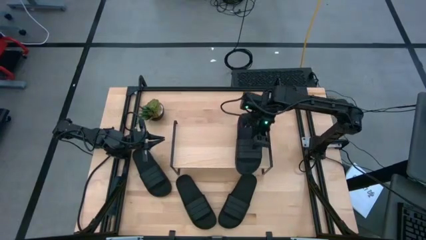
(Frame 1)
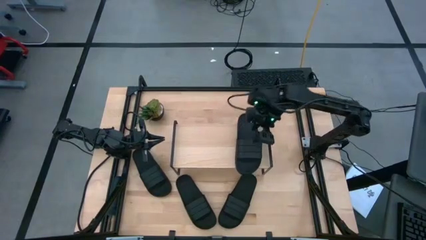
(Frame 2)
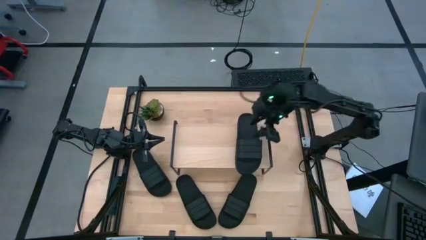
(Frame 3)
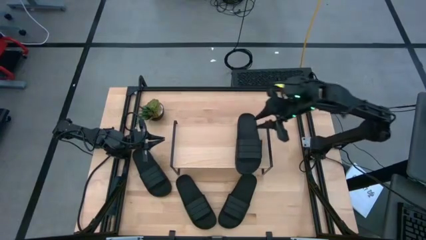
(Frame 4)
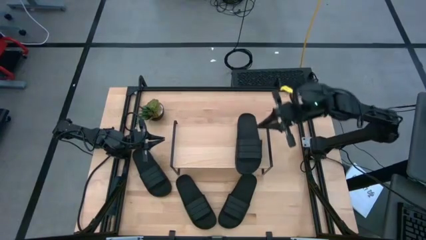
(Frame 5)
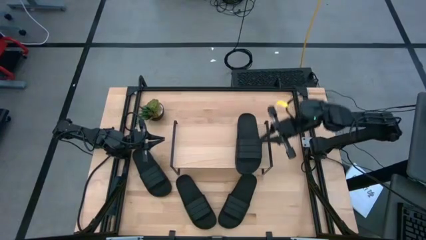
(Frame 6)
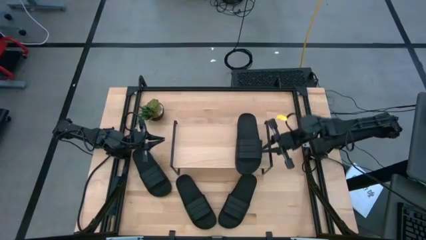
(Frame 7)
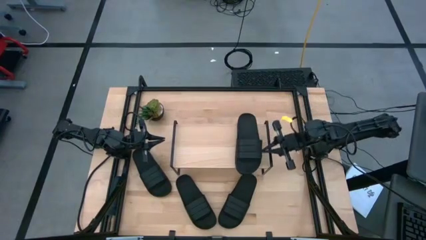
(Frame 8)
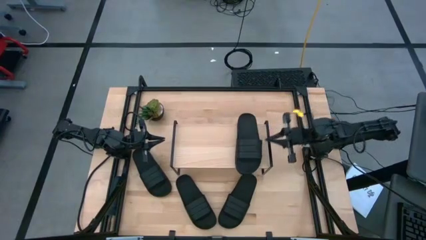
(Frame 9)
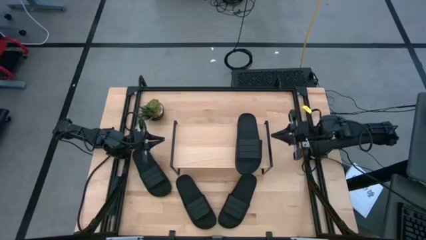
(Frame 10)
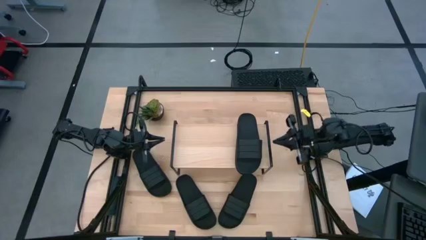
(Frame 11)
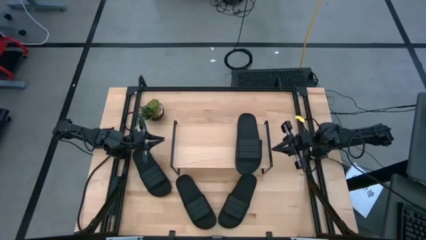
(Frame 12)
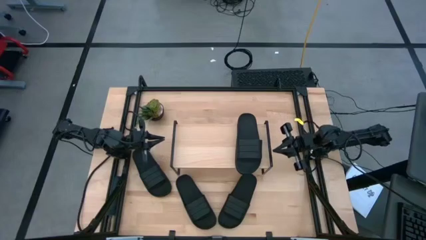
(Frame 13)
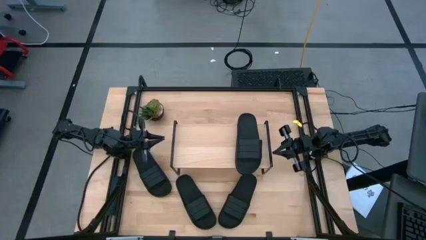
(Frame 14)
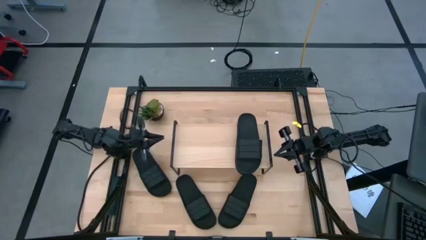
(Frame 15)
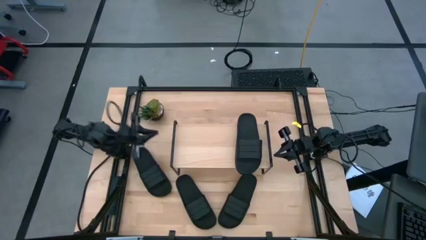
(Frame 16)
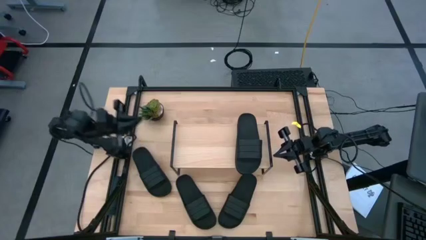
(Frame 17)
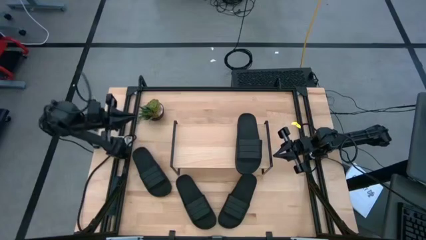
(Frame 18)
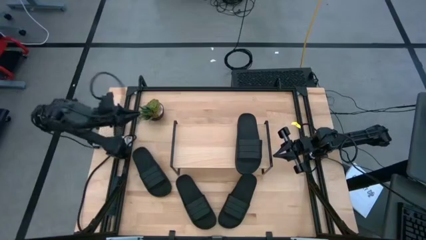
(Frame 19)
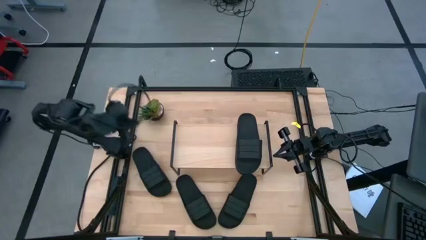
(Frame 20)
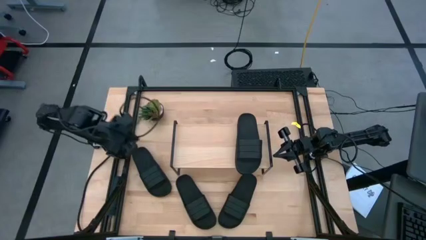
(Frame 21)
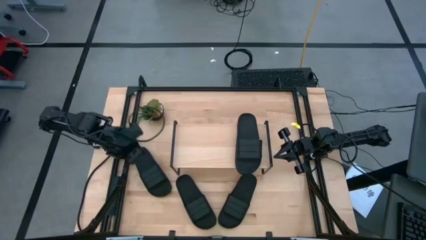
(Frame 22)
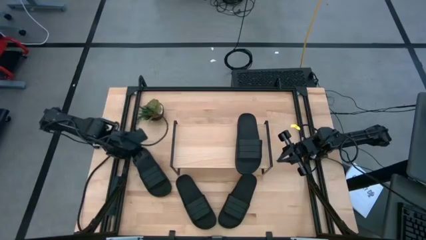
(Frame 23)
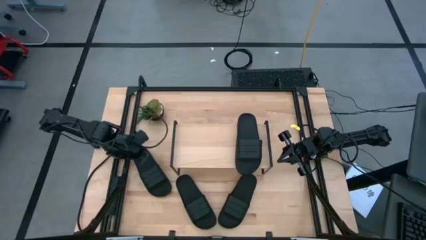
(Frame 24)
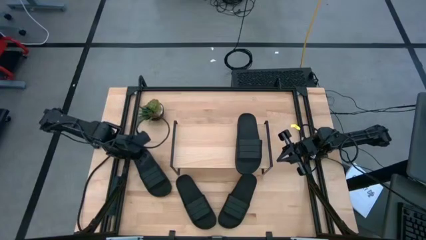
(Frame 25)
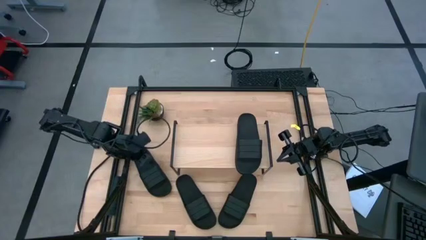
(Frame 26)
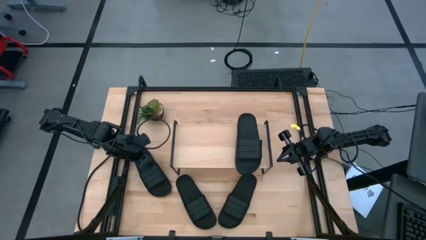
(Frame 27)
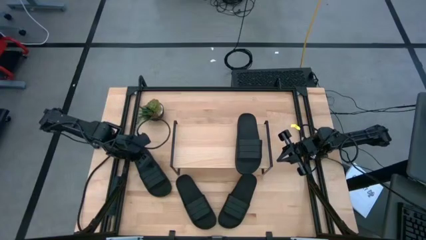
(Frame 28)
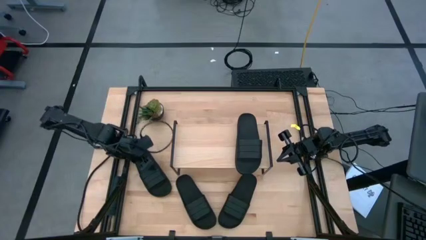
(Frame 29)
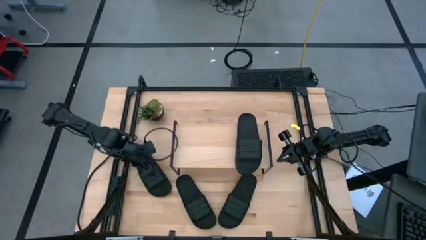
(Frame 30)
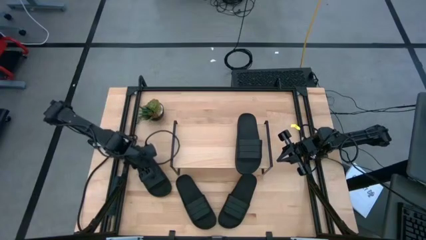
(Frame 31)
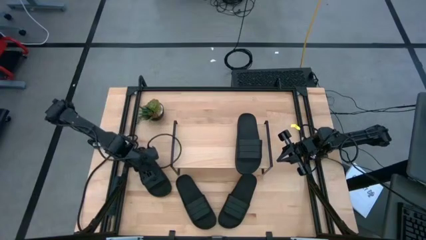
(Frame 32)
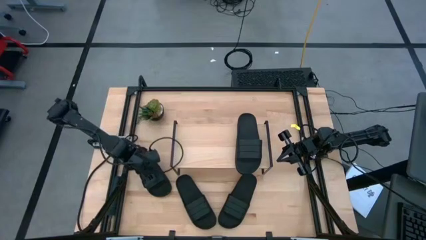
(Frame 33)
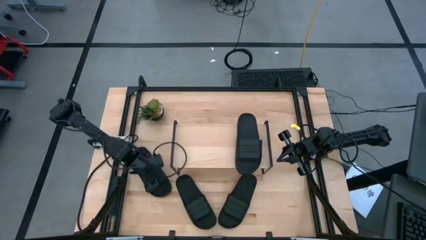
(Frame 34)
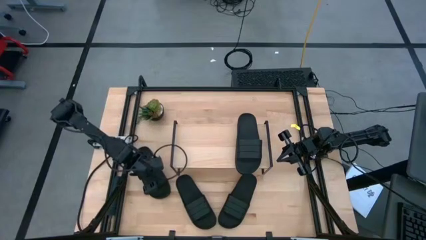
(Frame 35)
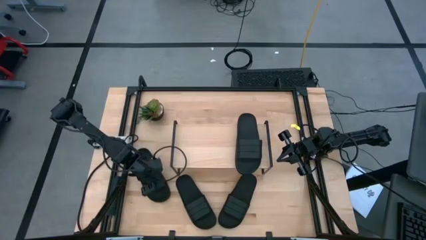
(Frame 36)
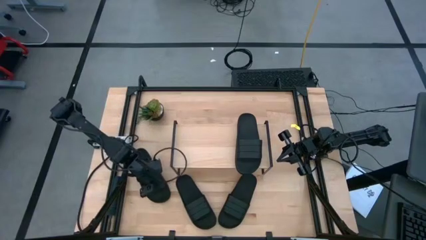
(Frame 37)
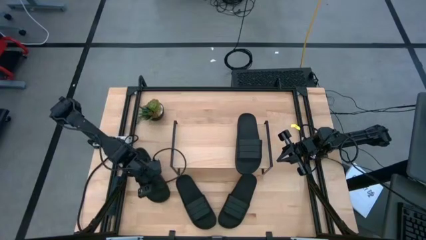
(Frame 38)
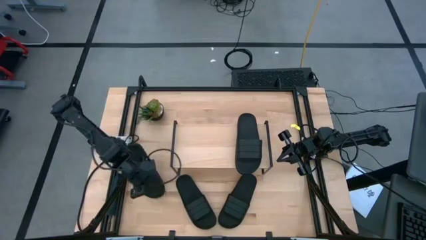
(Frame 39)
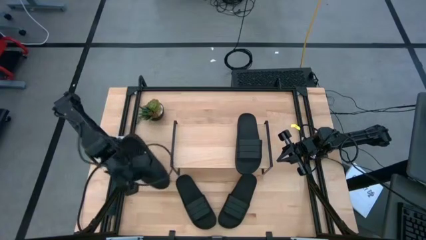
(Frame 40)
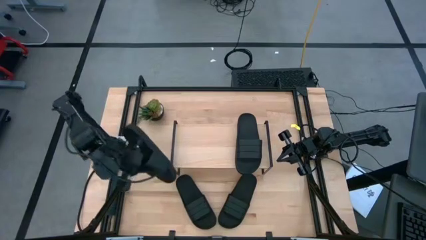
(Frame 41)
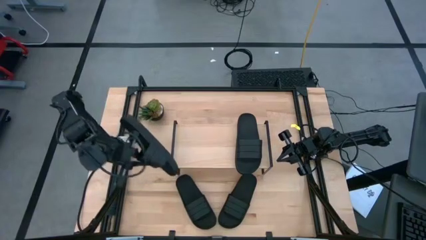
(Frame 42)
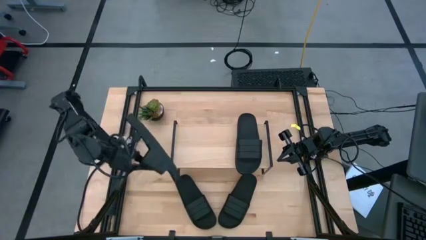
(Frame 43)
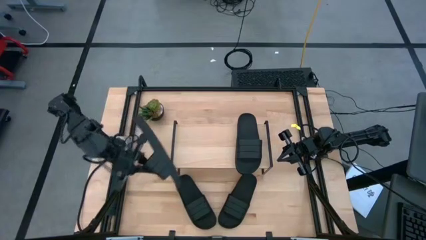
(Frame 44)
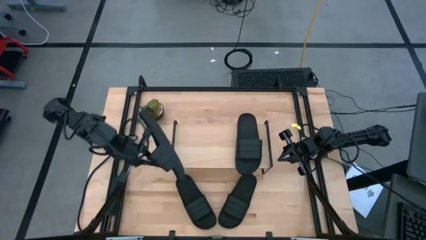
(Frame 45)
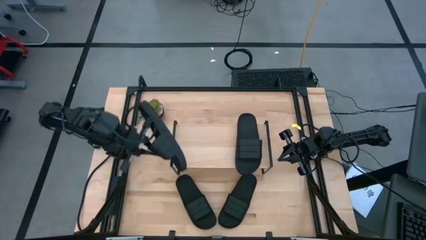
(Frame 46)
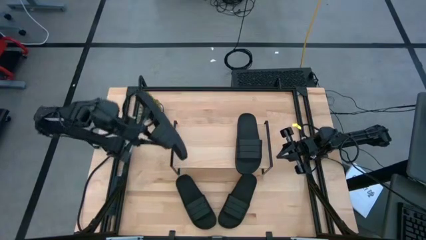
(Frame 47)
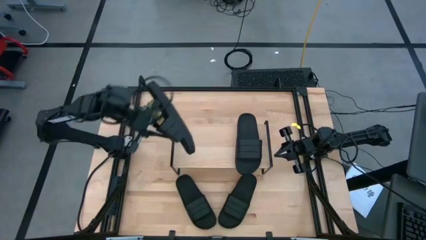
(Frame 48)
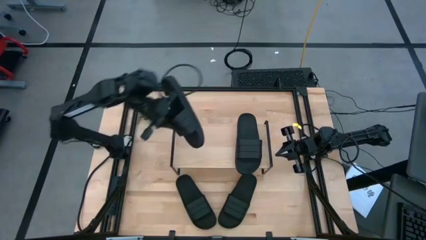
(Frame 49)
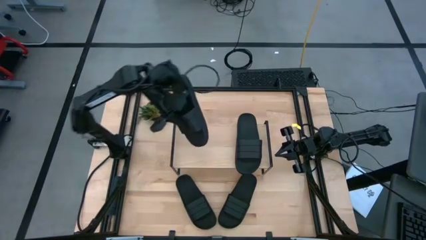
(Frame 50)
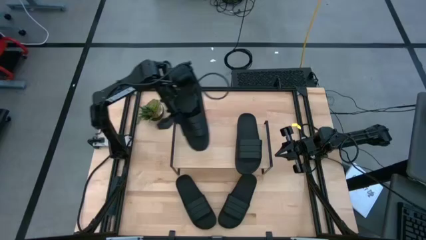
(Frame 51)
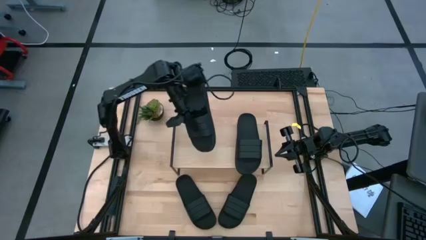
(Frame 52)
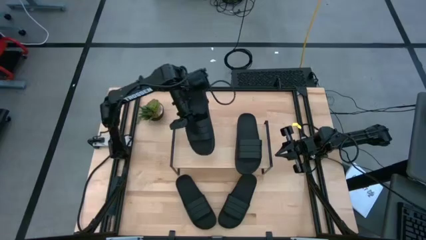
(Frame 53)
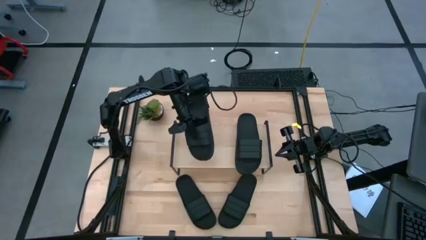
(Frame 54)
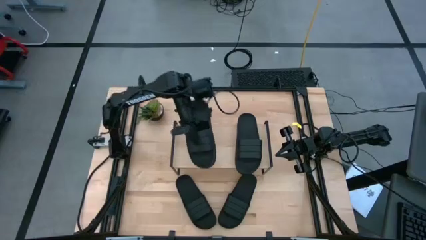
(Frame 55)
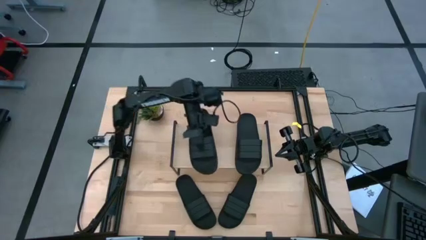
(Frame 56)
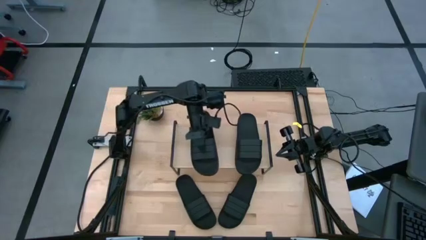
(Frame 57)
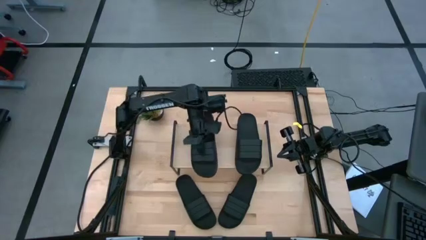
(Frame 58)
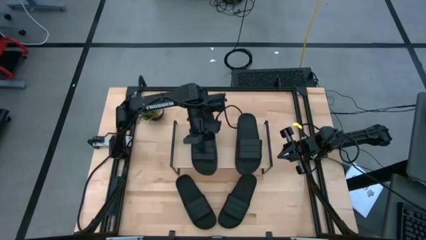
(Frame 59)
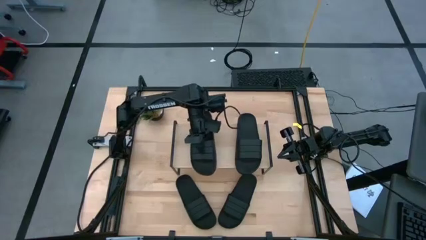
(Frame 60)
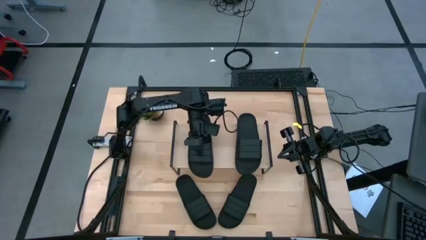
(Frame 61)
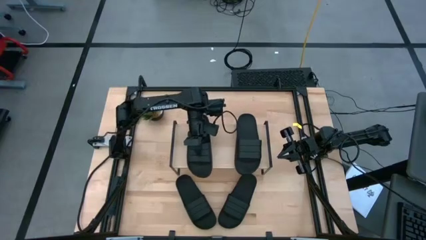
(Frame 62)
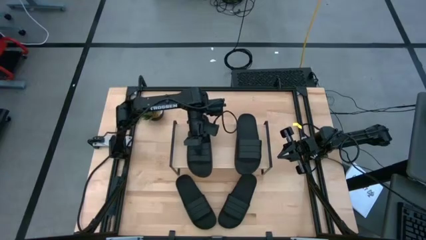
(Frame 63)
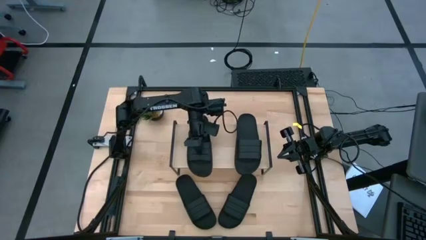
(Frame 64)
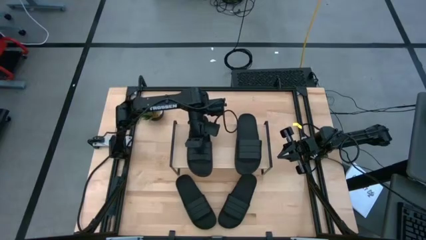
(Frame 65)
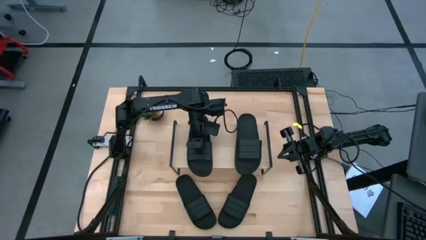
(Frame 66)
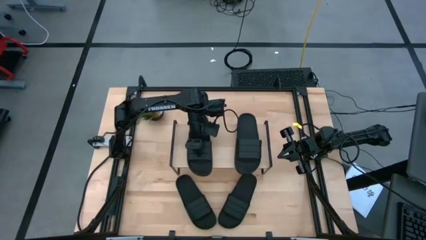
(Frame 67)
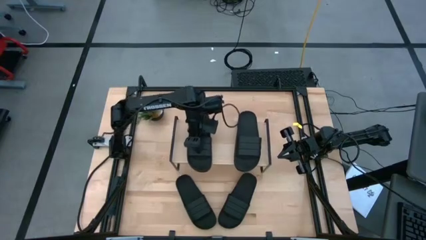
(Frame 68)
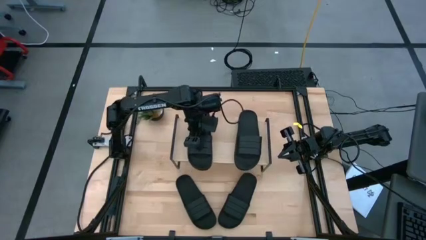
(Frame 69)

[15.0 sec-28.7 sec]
Task: Pick and place slides into the shelf
Put the black slide on the shelf

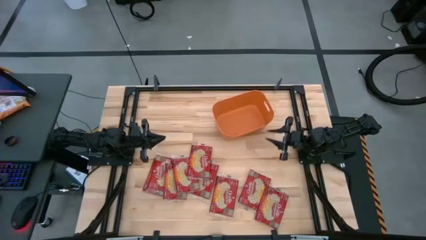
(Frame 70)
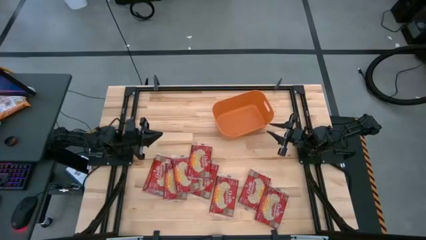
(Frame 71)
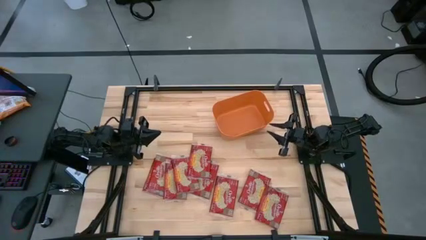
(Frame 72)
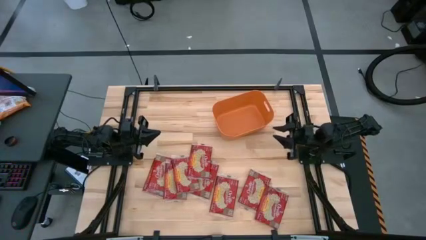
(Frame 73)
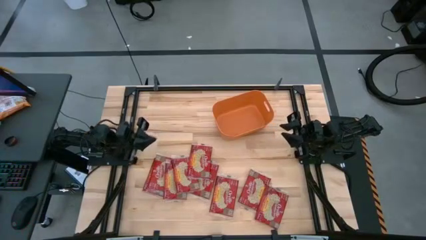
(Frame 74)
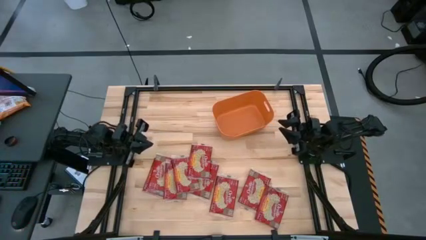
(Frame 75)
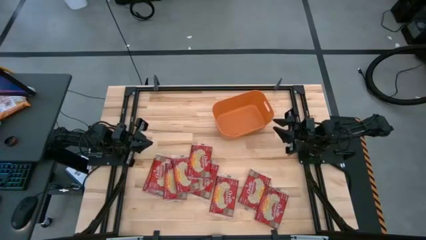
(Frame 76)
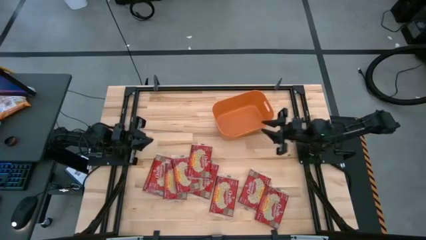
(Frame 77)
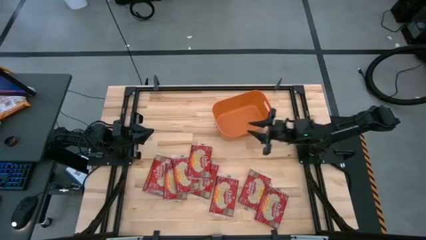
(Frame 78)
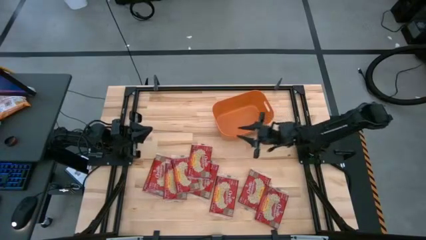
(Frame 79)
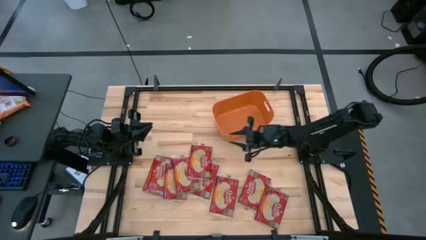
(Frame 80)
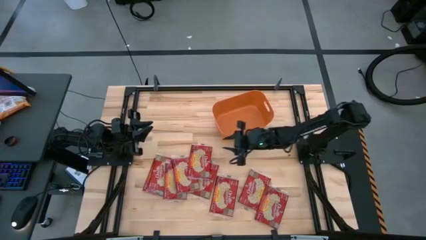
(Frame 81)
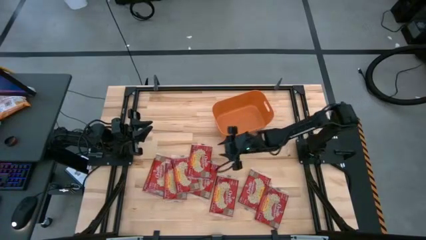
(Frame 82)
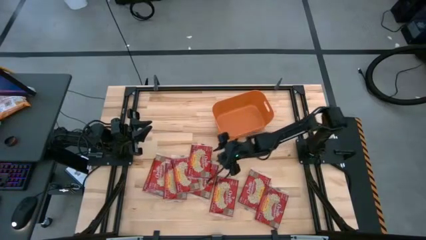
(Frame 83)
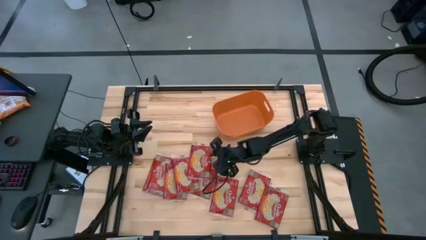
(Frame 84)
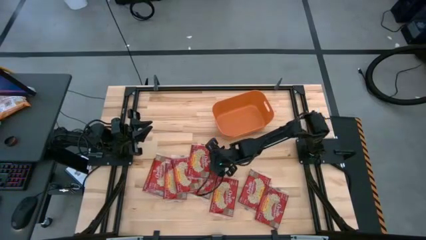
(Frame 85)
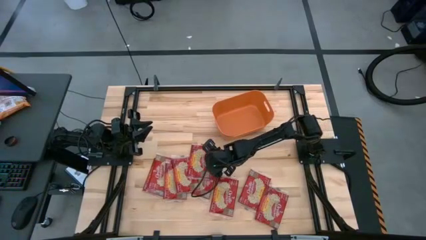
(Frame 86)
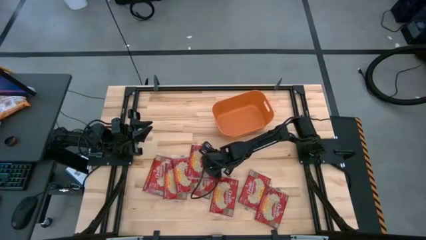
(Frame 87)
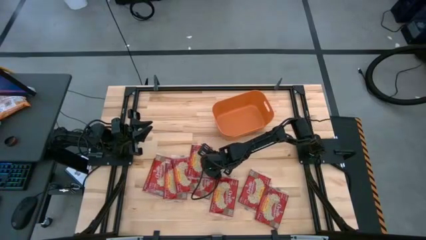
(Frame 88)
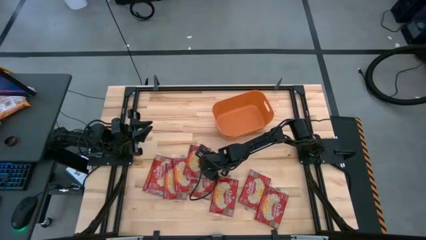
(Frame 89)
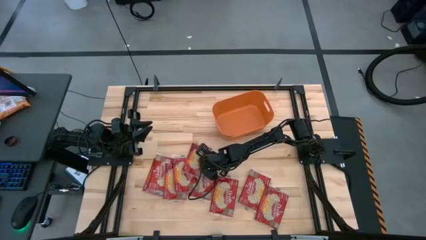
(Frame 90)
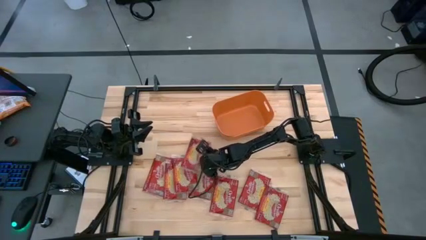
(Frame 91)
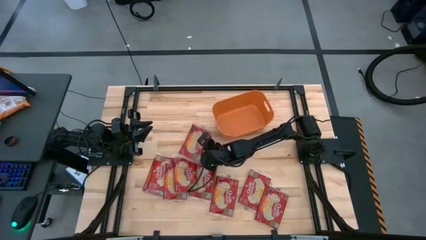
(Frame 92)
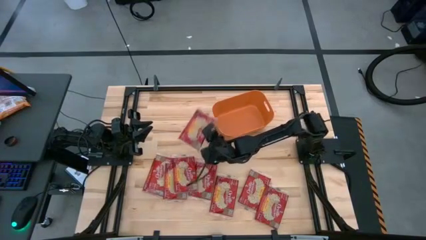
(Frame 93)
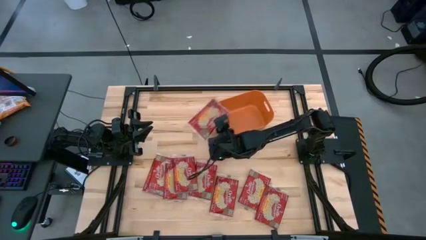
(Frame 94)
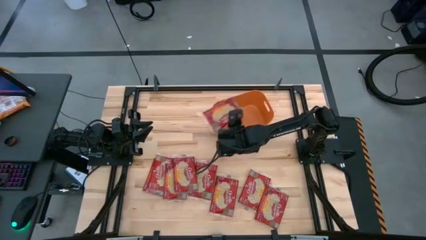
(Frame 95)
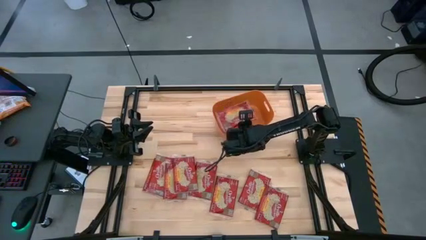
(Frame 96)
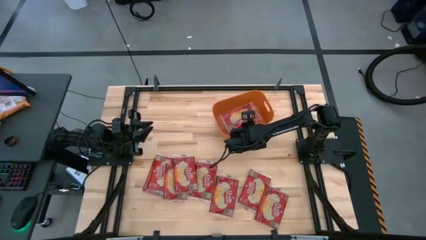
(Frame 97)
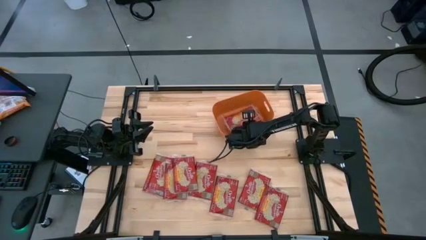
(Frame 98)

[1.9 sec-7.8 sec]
Task: Sort popcorn bags into baskets
Put the popcorn pack into the orange bin
